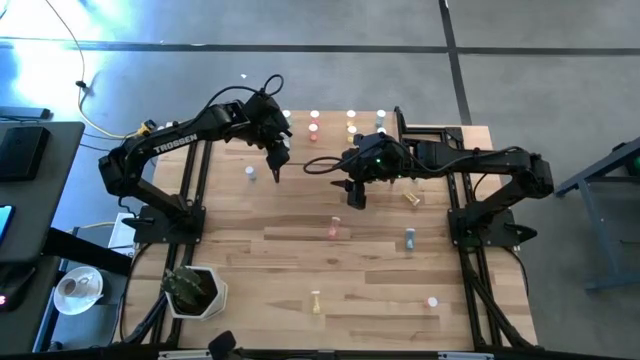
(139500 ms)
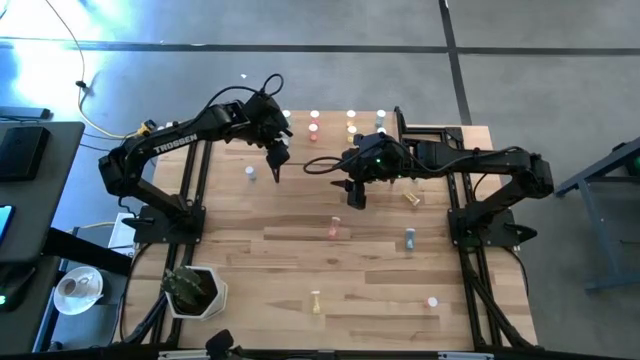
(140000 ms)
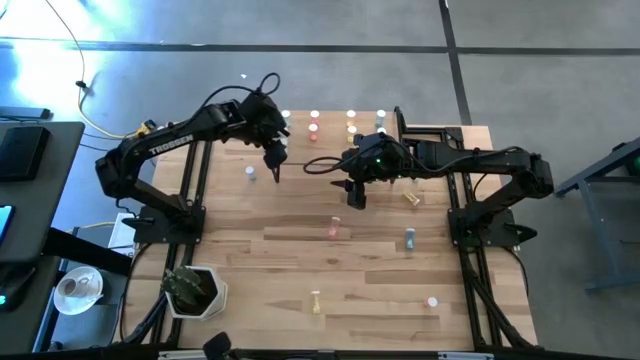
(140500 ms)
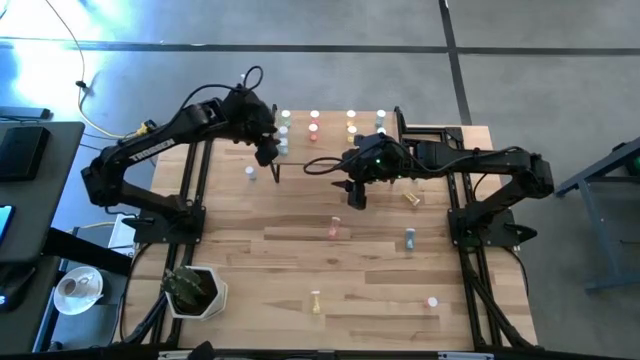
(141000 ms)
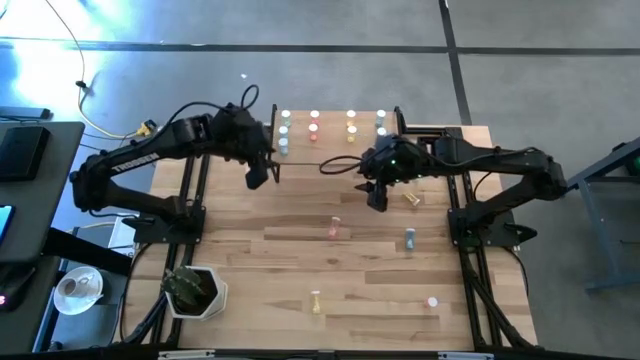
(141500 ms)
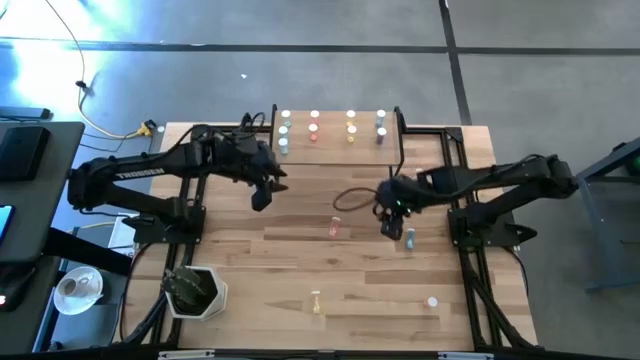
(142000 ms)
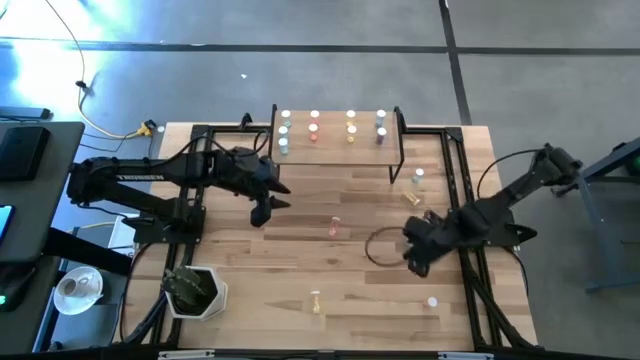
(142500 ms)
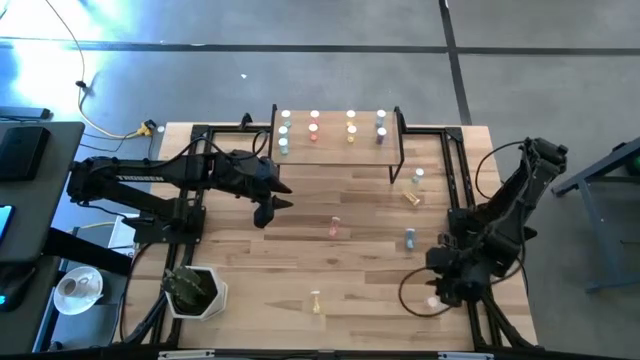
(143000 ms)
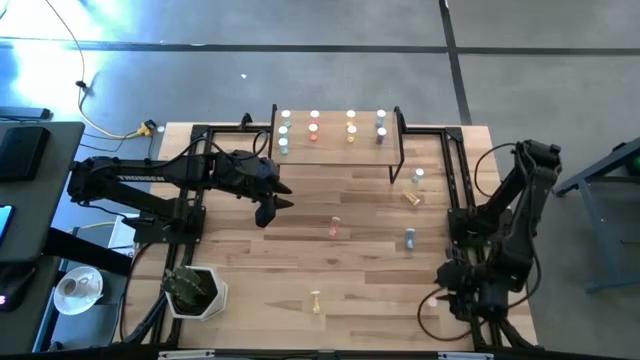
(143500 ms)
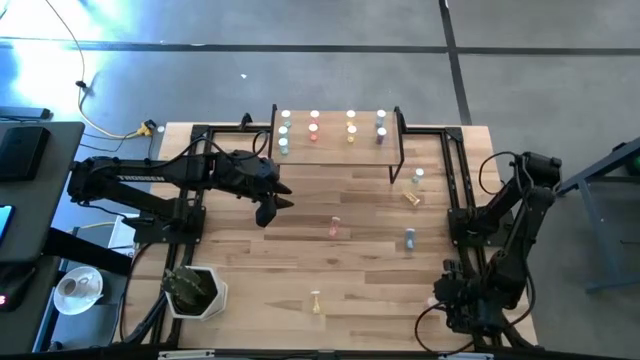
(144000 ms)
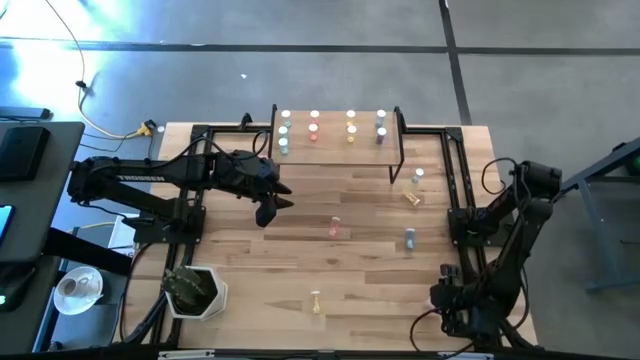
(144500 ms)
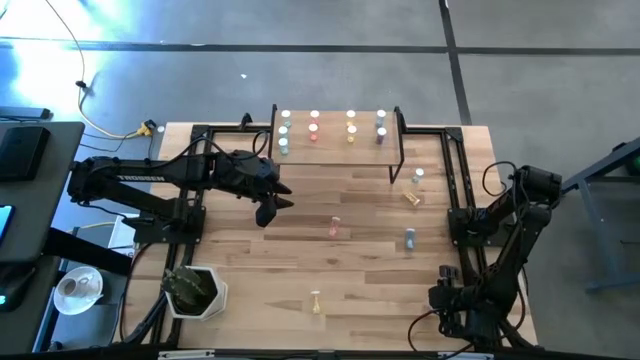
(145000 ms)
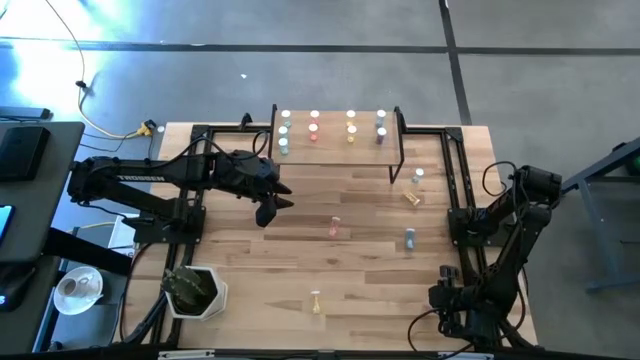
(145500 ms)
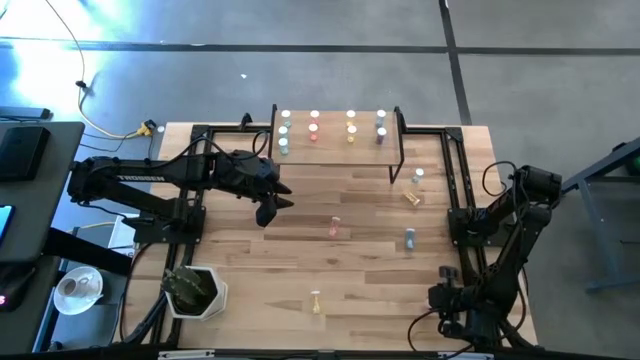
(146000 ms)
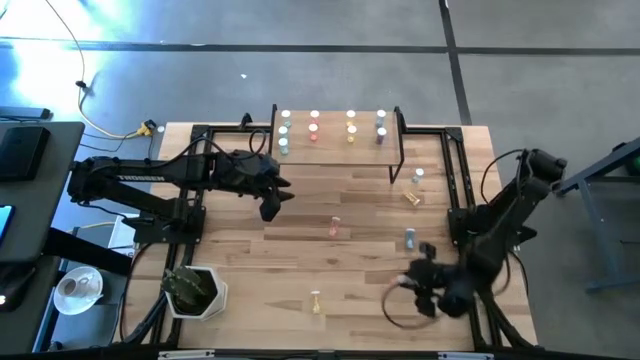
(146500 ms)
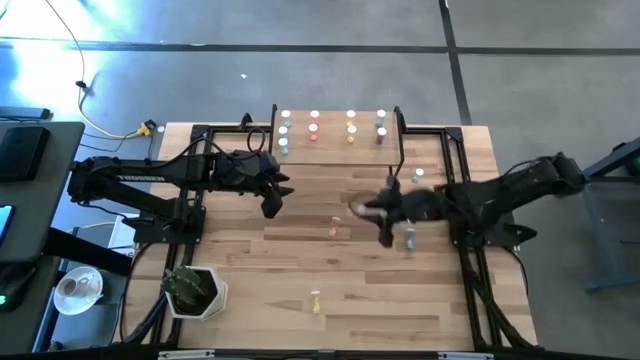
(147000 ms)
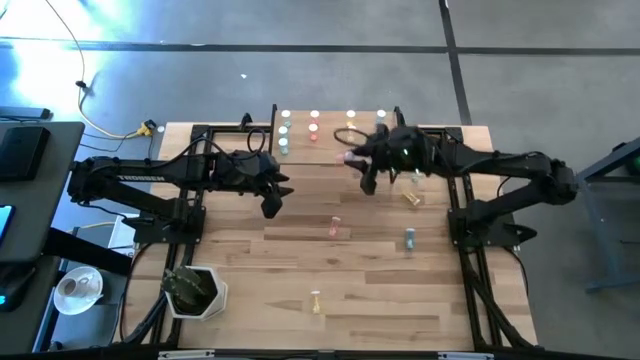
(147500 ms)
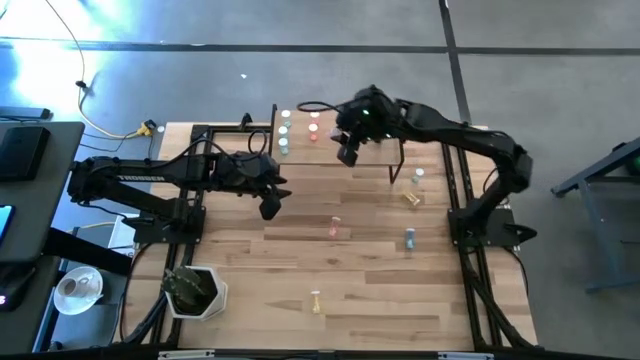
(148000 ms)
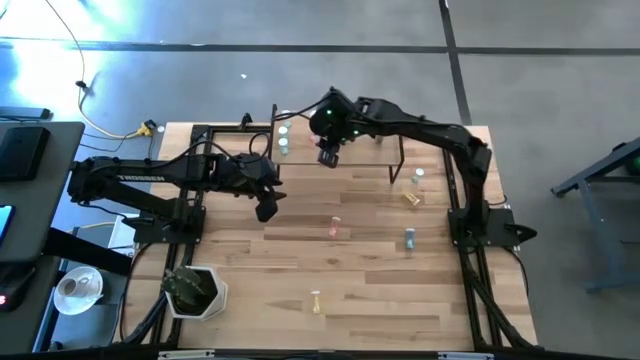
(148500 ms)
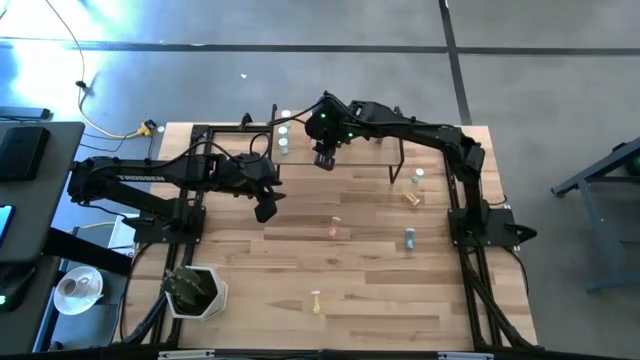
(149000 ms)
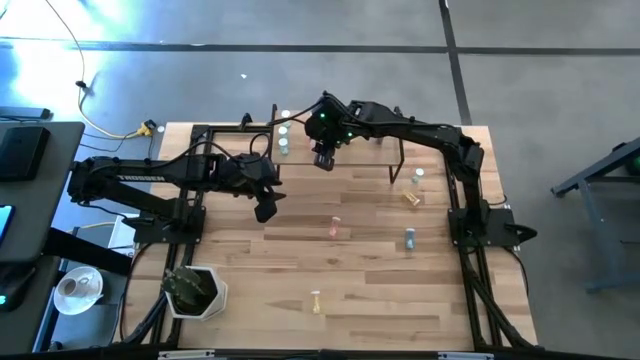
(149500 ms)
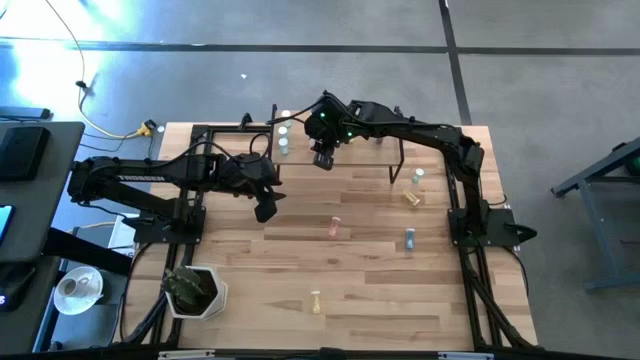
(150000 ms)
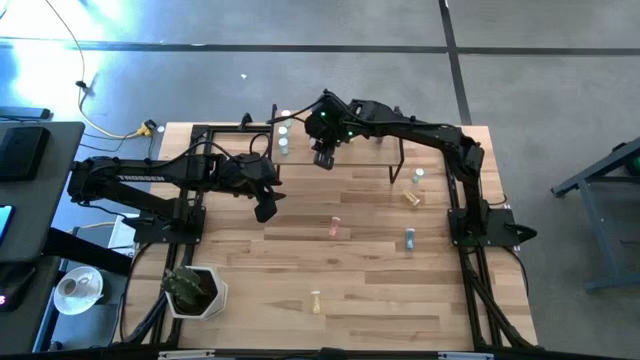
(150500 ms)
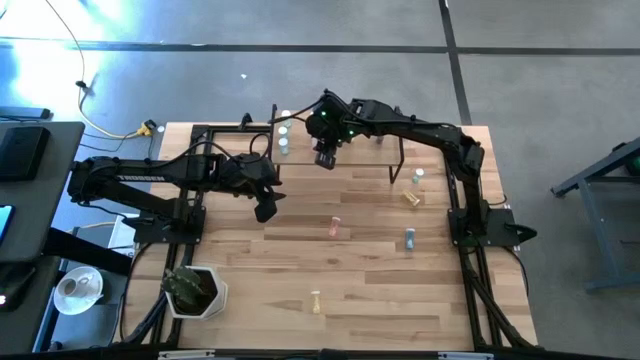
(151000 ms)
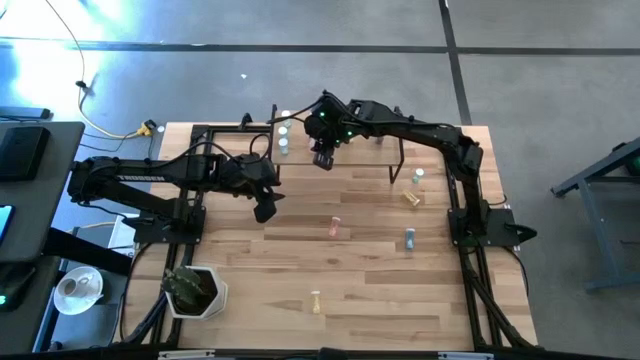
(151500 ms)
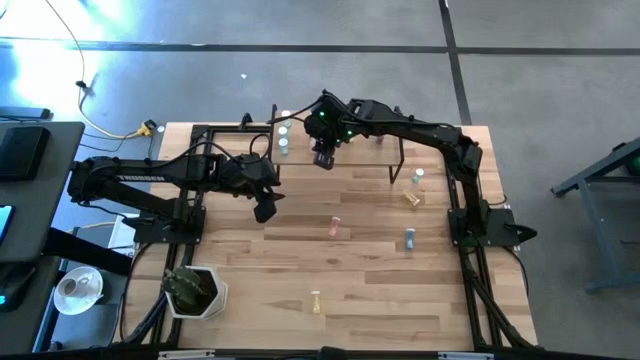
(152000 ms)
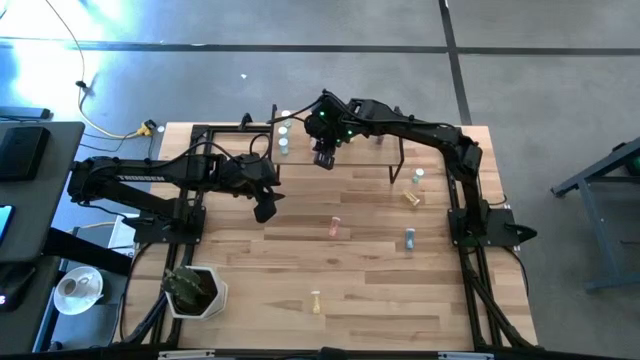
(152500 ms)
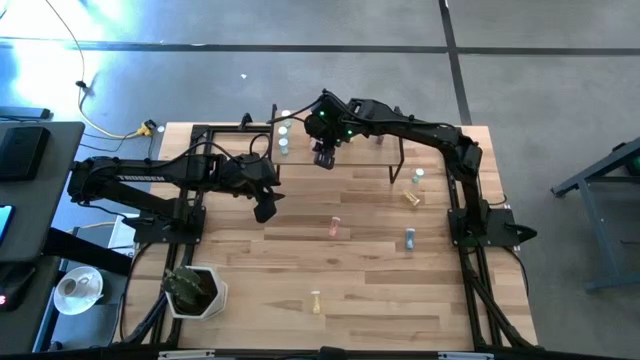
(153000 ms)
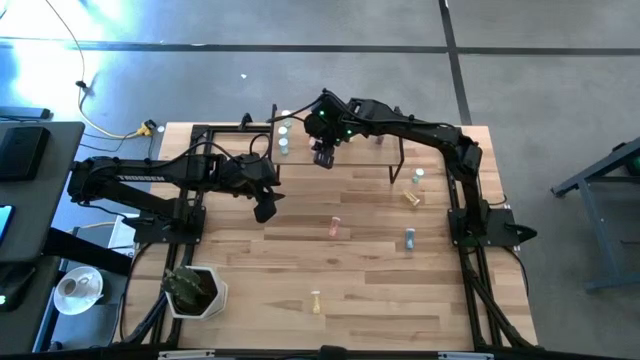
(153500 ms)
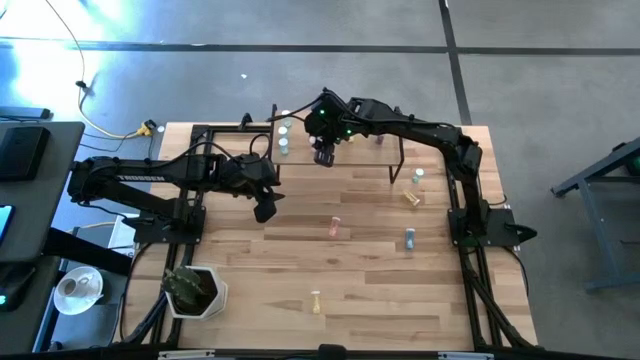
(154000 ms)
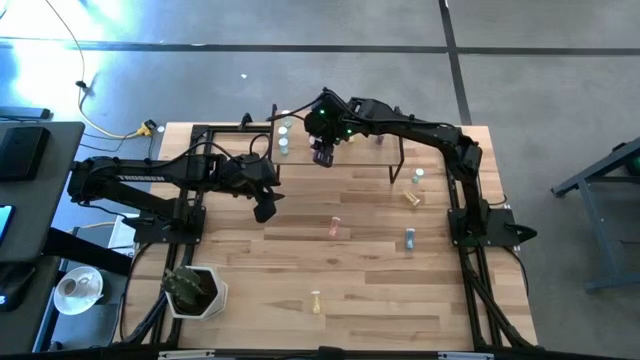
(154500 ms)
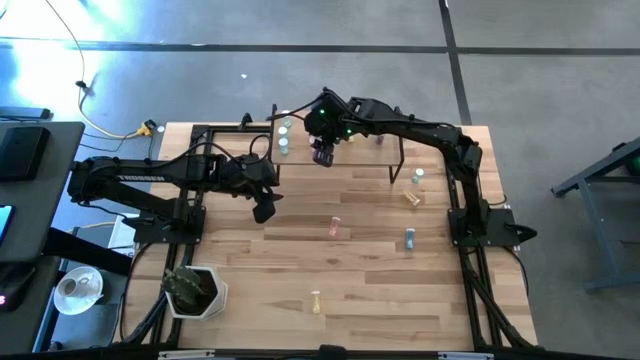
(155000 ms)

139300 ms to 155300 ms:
Task: Pick and place medicine bottles onto shelf by color
Put the pink pill bottle on the shelf

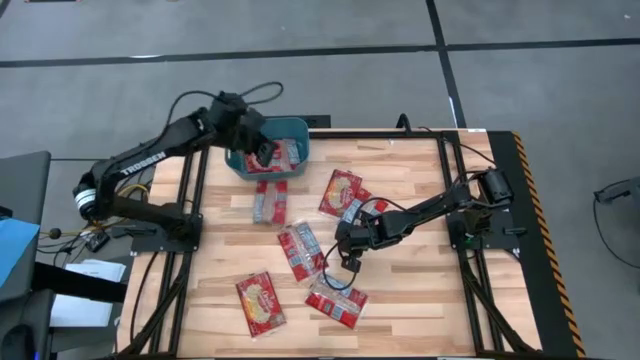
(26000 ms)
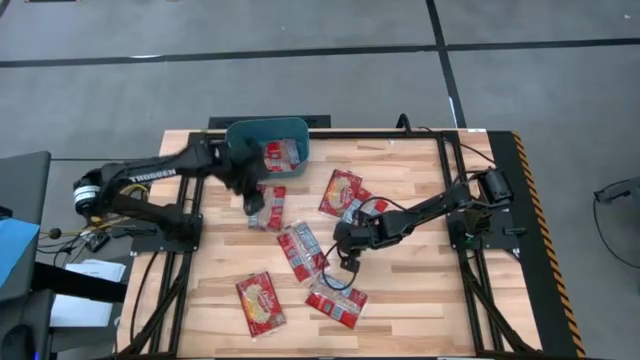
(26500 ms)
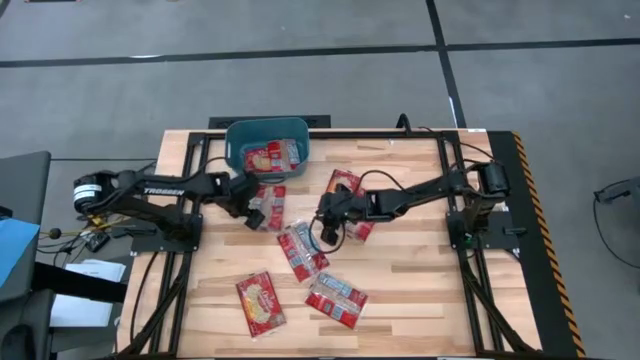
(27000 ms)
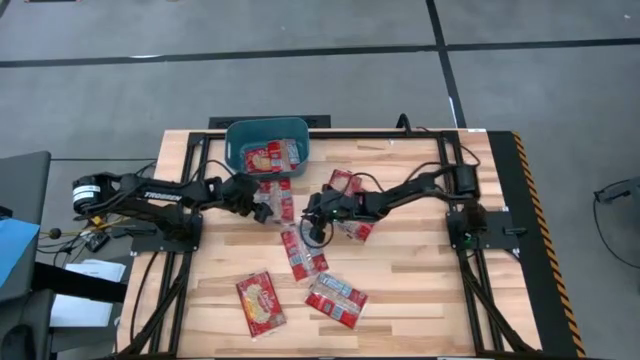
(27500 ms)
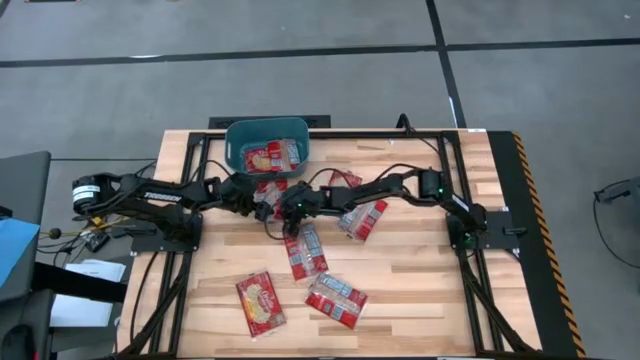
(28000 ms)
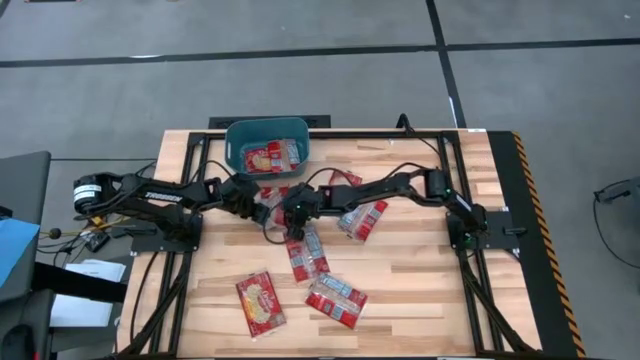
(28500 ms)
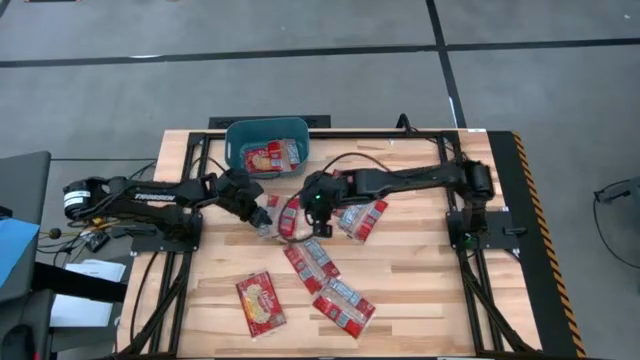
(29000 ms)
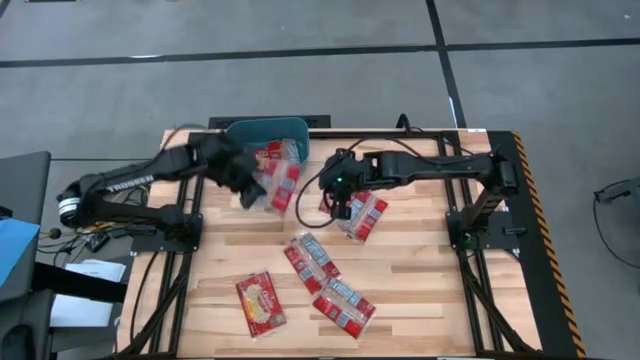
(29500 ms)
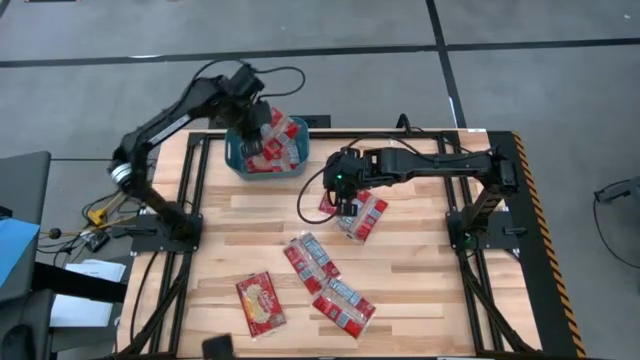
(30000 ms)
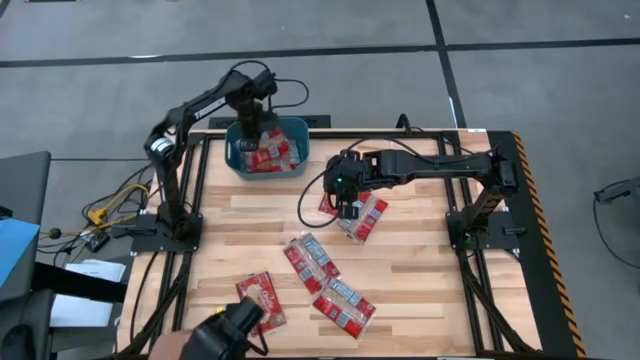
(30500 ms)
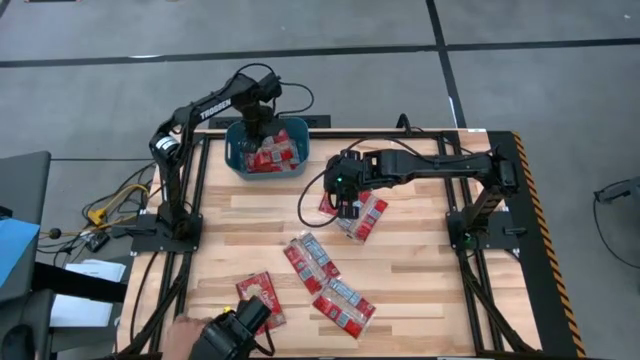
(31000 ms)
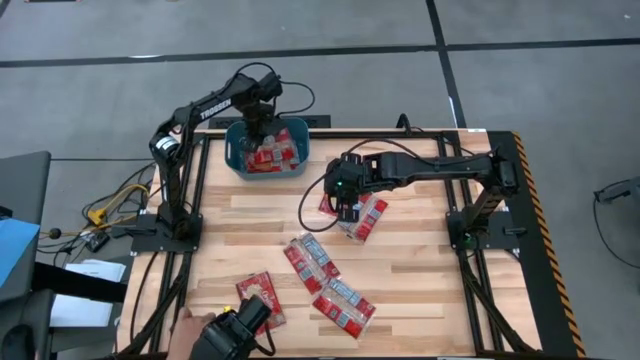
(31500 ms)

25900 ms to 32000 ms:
Task: Sort popcorn bags into baskets
Put the red popcorn bag into the blue bin
